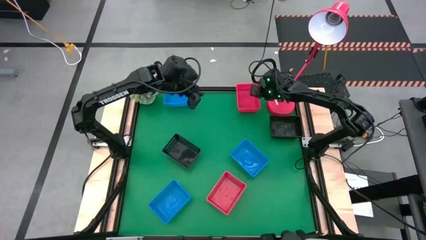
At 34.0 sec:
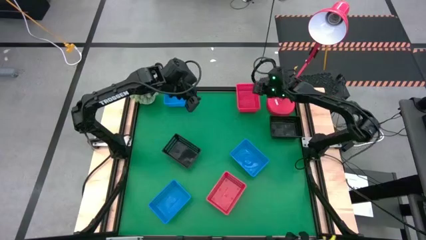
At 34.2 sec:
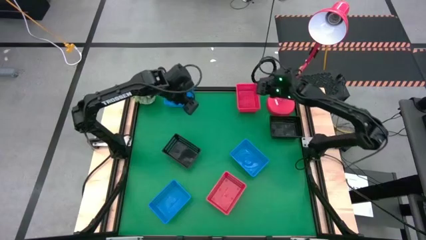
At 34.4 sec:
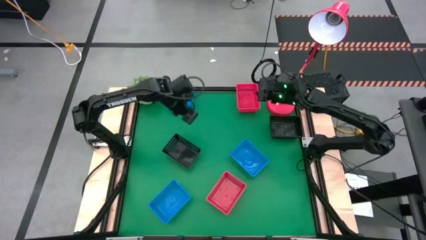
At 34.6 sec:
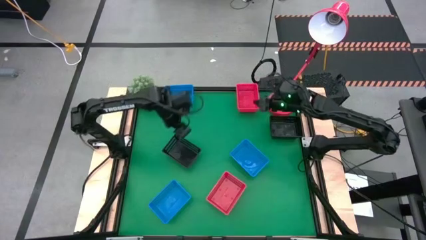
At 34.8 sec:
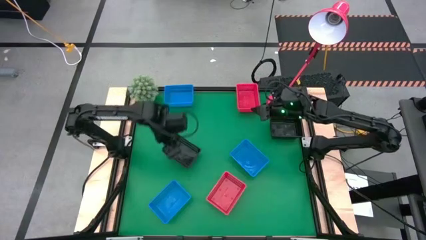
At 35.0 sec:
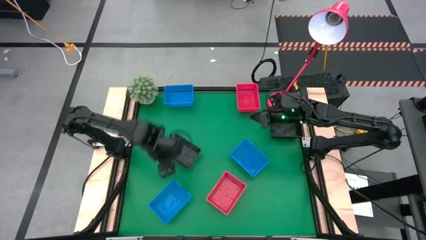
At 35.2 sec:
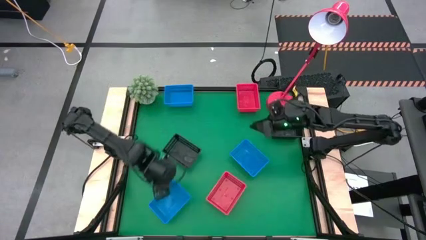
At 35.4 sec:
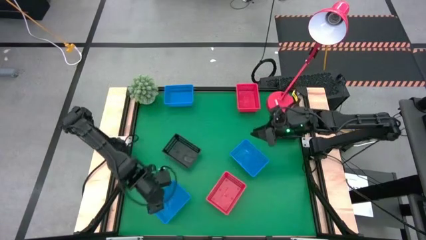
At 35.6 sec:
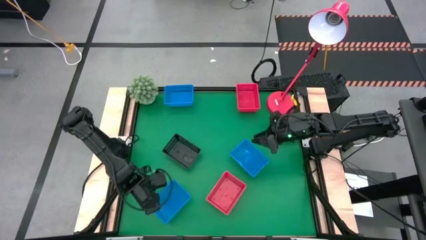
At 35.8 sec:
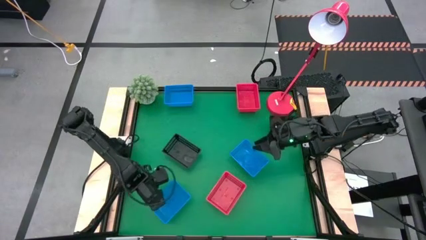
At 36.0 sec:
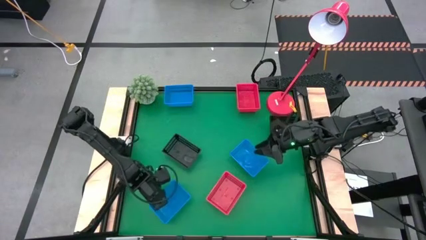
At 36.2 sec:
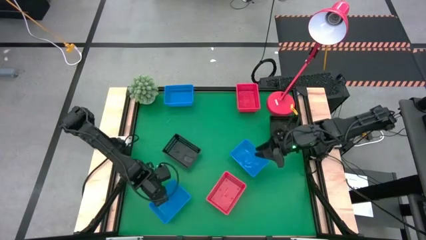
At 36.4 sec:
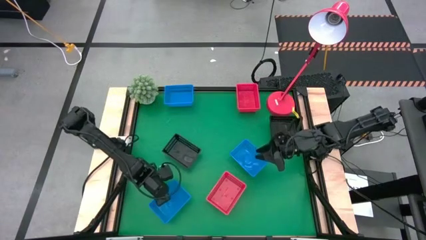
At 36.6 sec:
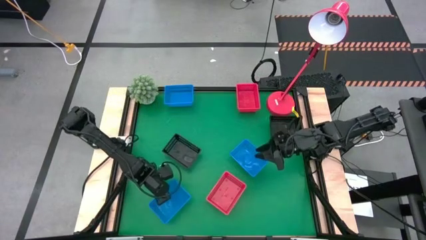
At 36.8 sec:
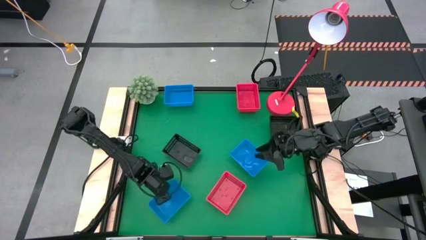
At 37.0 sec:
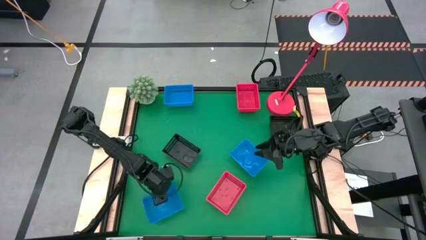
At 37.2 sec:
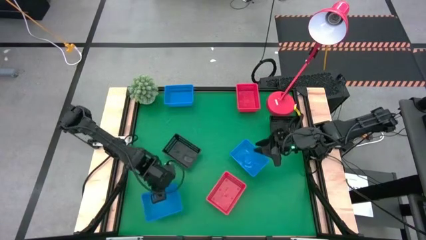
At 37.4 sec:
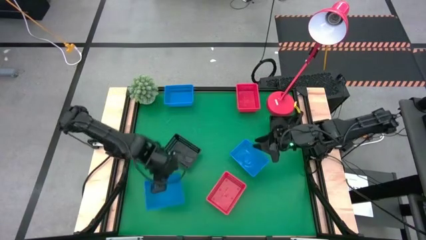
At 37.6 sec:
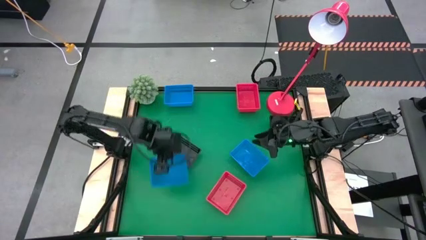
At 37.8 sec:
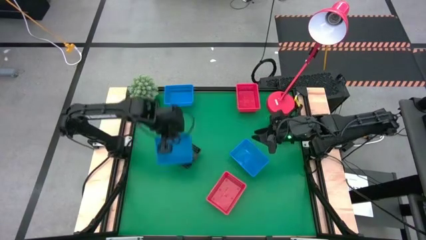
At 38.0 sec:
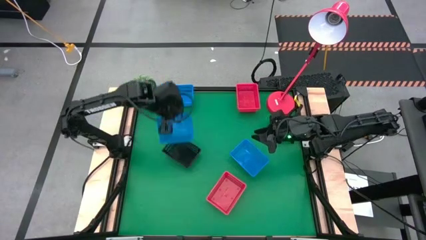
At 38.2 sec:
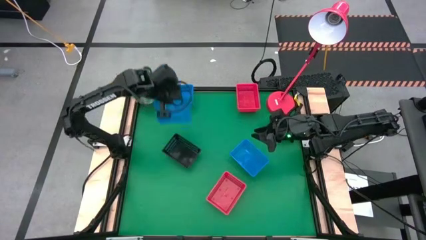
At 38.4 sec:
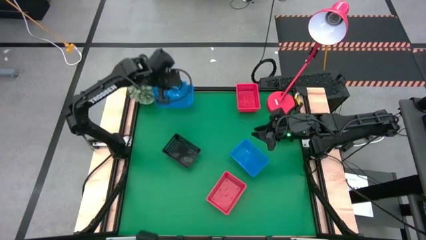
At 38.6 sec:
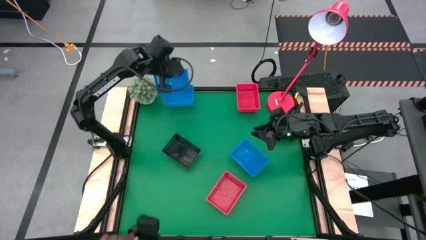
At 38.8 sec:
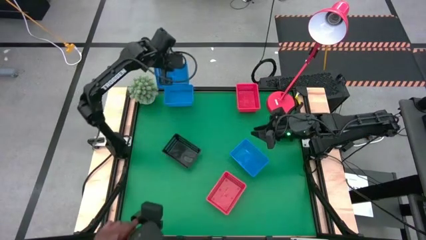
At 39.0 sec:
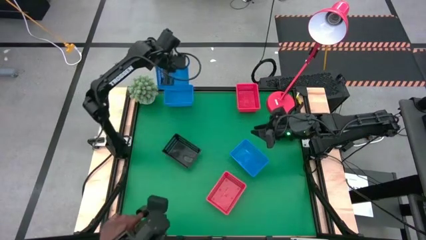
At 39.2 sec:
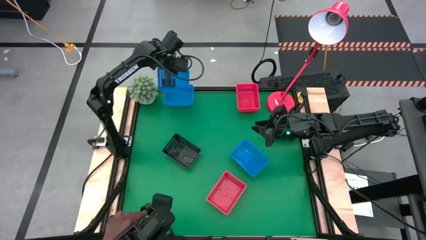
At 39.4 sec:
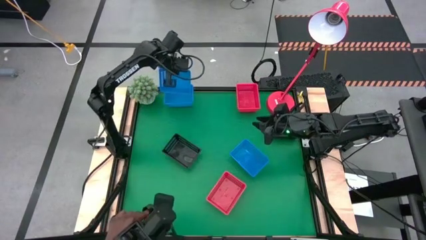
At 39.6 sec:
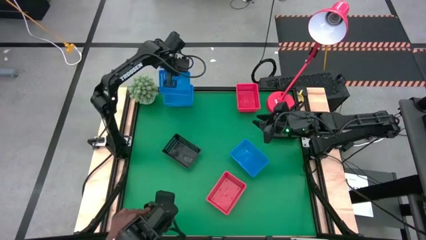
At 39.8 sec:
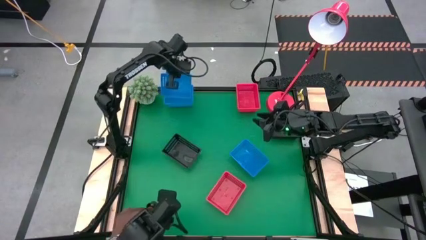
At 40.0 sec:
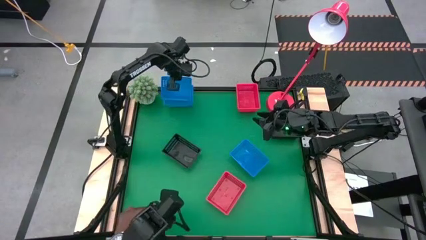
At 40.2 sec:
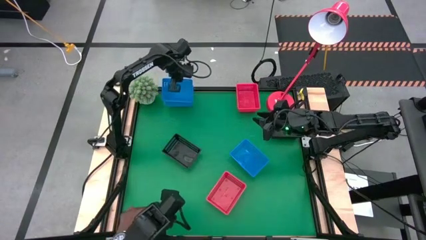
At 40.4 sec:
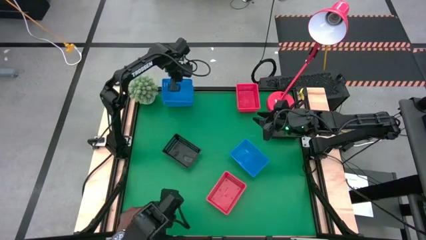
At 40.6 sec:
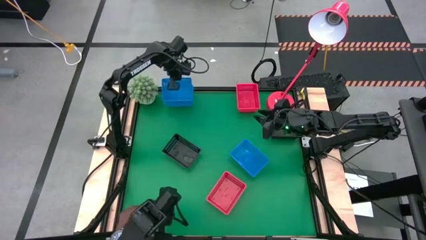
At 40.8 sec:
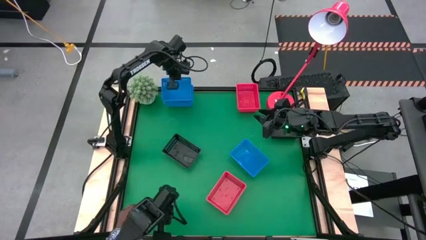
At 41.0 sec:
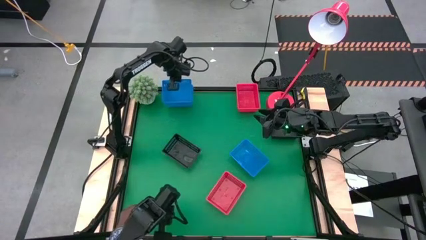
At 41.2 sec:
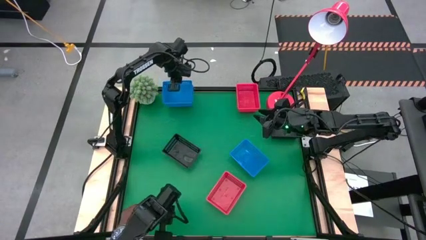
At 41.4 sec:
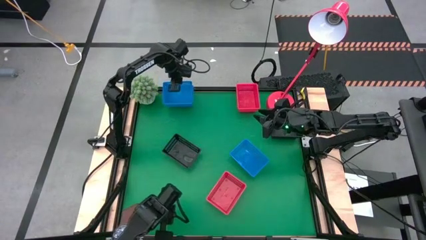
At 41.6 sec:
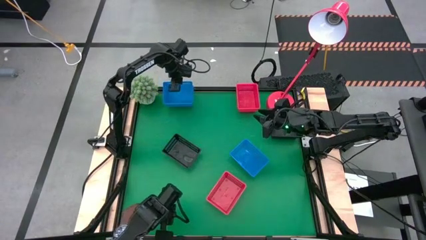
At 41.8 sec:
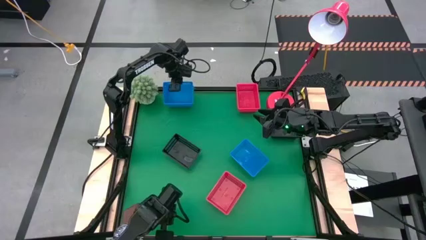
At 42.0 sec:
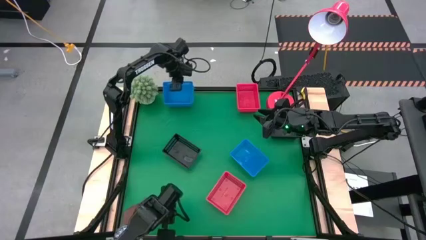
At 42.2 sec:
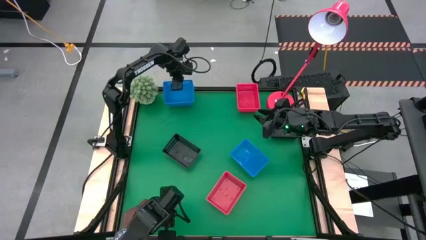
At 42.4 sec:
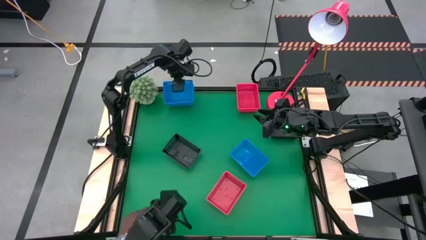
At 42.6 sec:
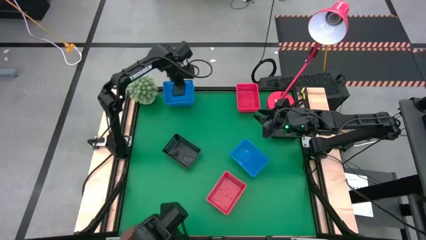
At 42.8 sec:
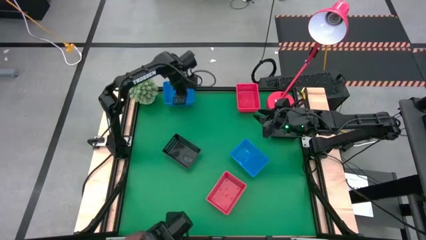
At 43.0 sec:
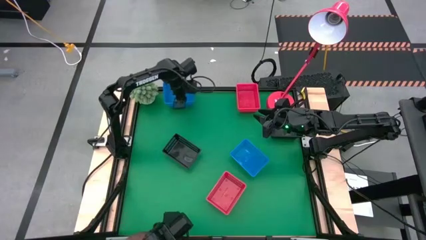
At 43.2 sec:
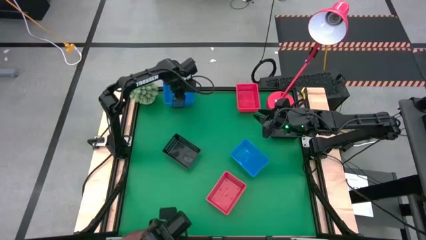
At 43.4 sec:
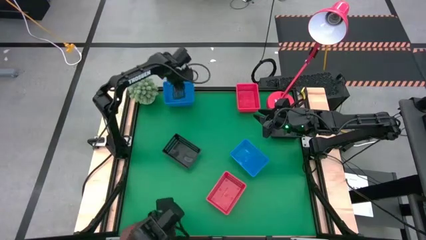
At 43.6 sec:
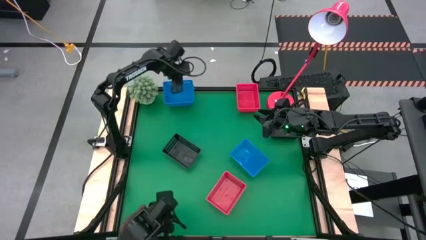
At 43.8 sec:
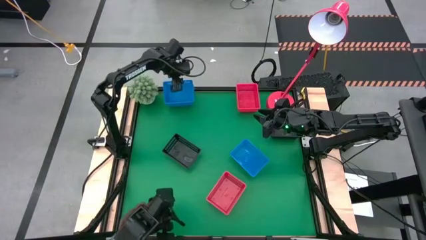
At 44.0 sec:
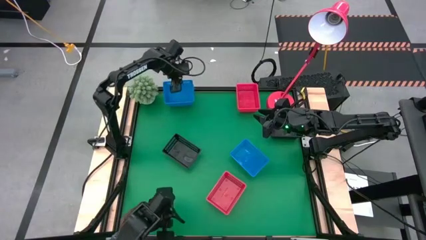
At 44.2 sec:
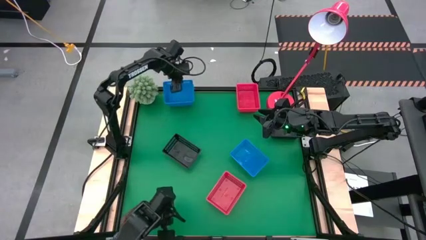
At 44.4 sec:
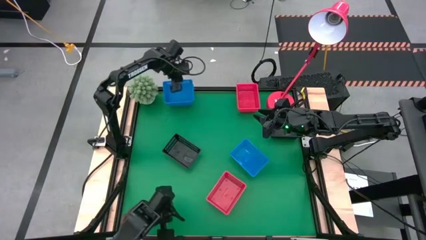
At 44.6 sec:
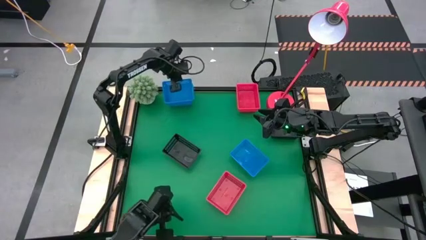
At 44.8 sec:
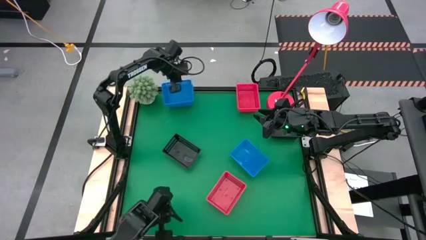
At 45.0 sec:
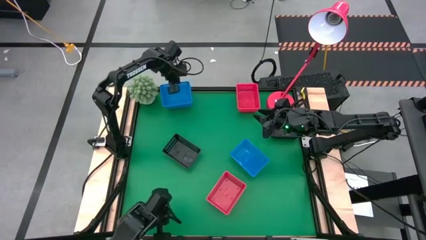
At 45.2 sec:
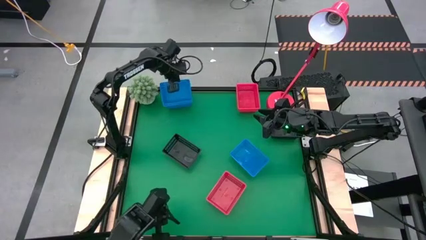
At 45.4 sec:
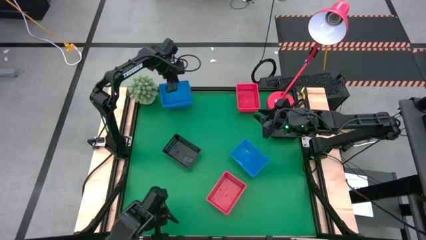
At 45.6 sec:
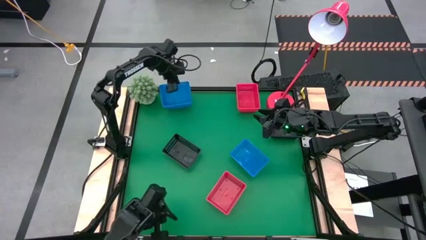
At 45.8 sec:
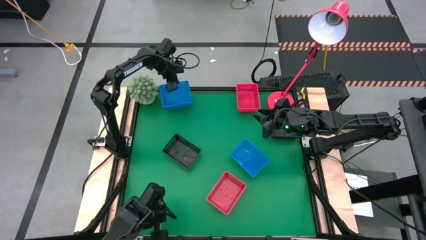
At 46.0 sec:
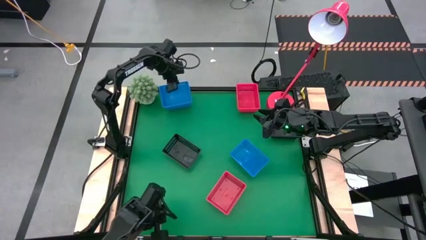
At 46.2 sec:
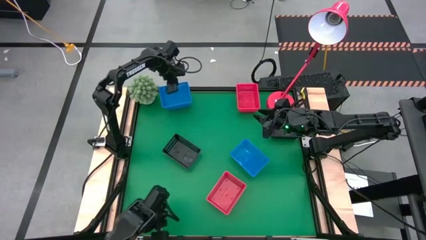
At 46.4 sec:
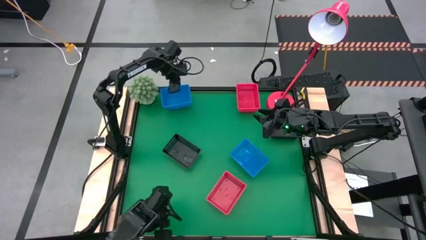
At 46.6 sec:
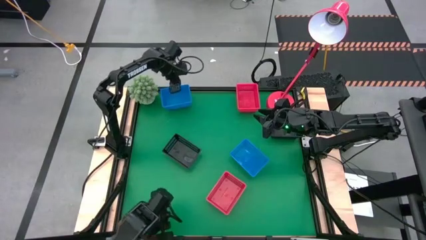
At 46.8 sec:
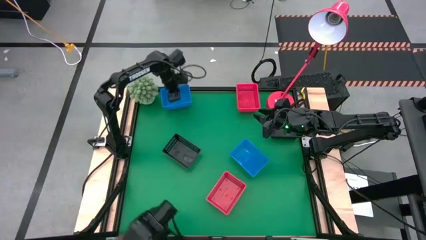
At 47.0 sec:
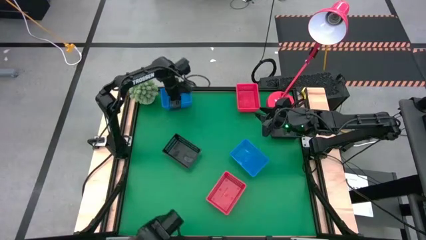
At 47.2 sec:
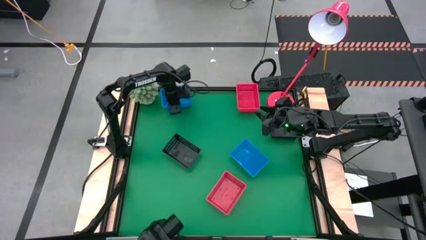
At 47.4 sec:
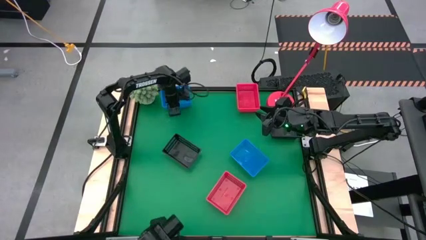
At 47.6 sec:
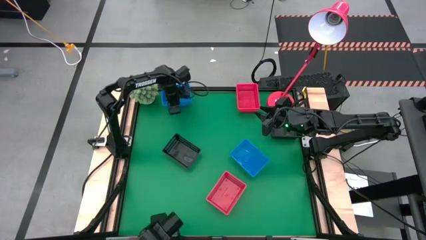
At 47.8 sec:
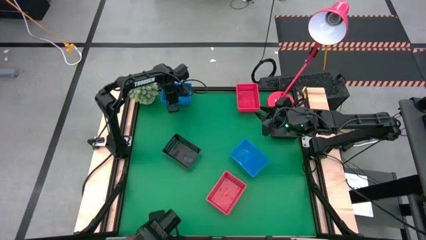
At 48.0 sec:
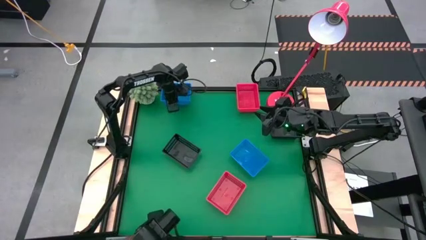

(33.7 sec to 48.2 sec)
Stack the bottom blue bin on top of the top blue bin
